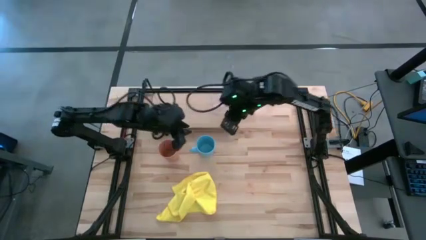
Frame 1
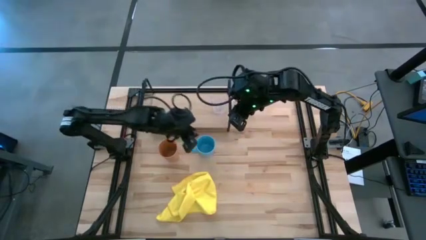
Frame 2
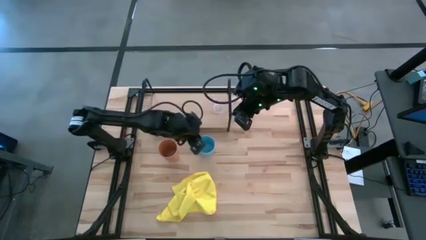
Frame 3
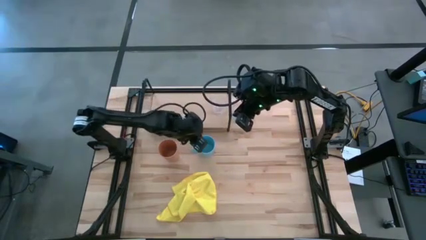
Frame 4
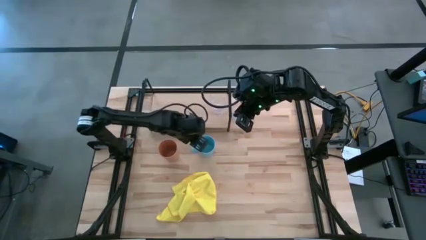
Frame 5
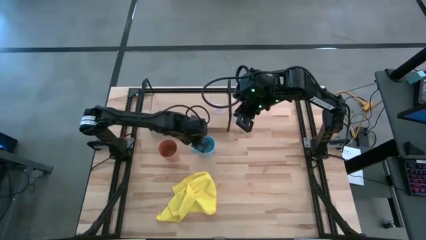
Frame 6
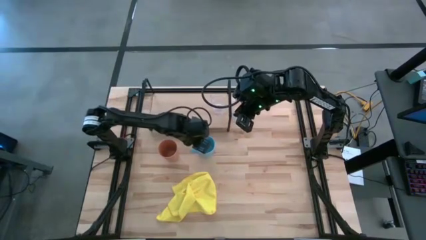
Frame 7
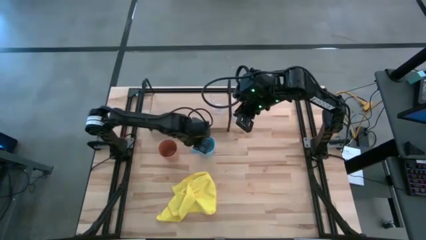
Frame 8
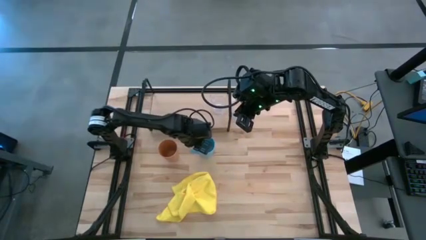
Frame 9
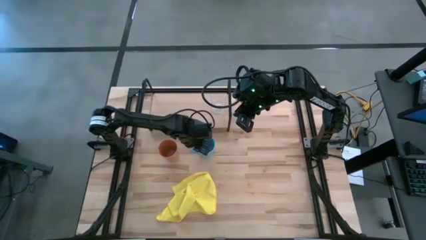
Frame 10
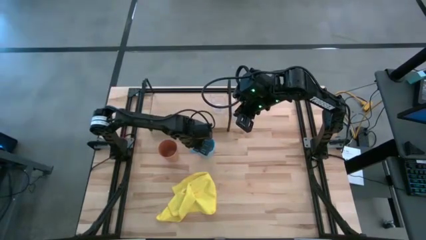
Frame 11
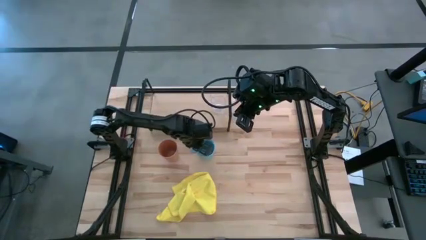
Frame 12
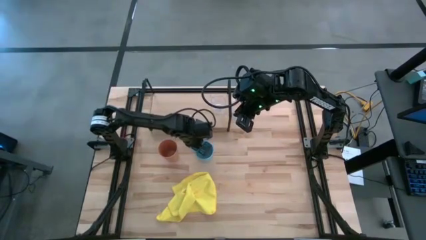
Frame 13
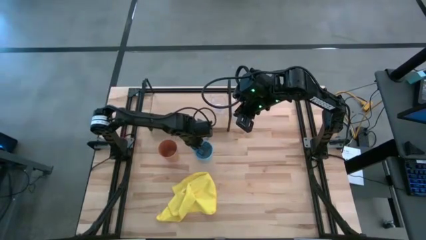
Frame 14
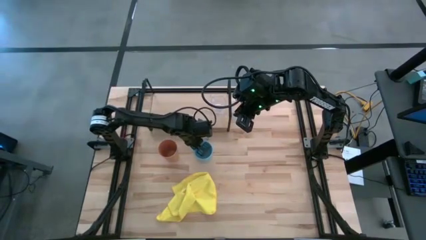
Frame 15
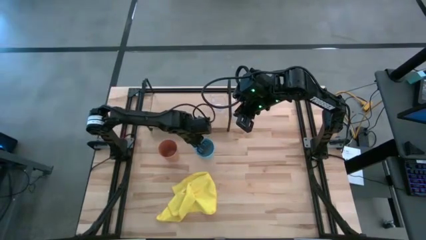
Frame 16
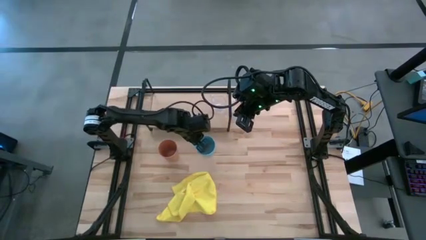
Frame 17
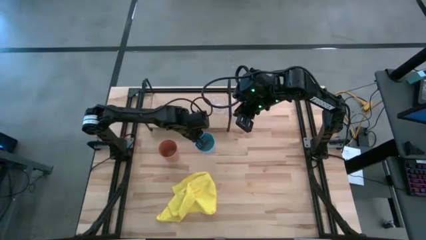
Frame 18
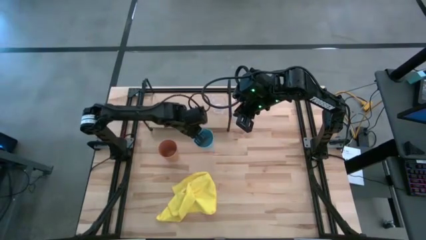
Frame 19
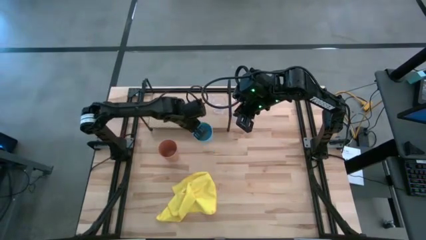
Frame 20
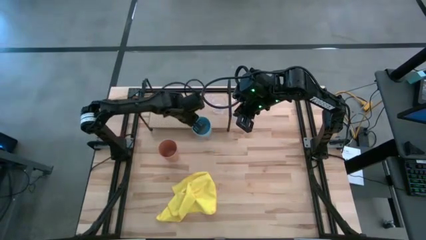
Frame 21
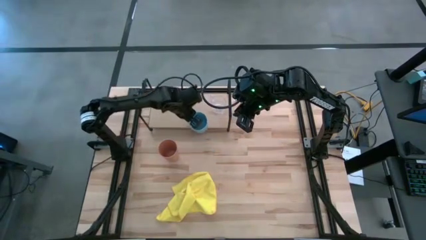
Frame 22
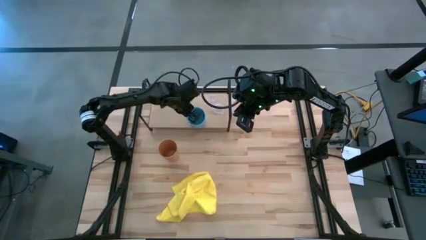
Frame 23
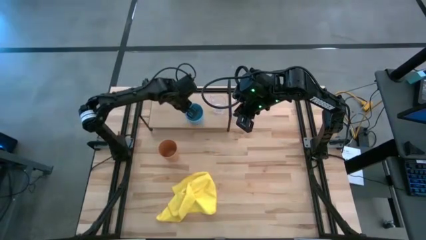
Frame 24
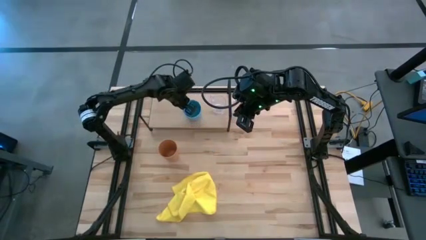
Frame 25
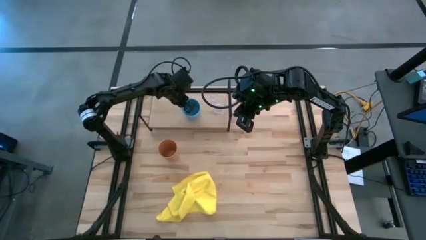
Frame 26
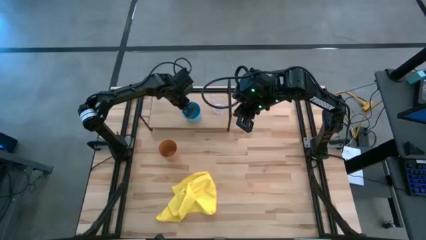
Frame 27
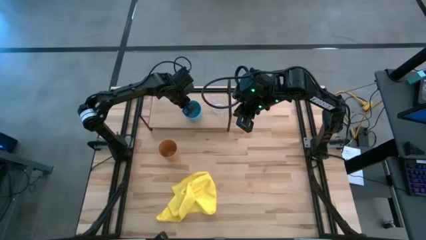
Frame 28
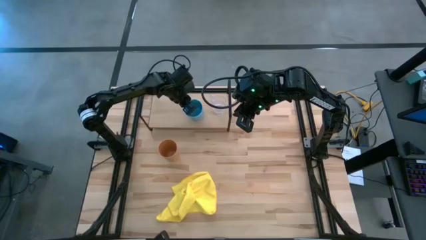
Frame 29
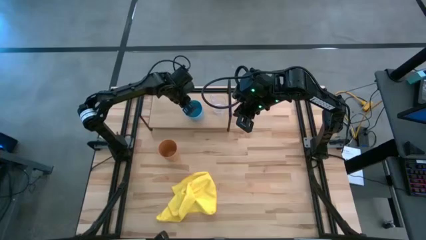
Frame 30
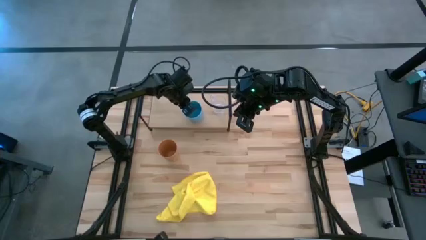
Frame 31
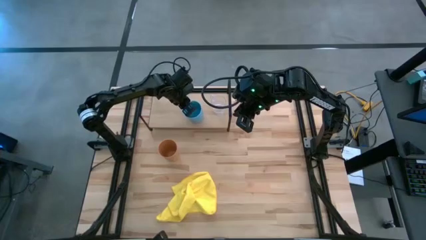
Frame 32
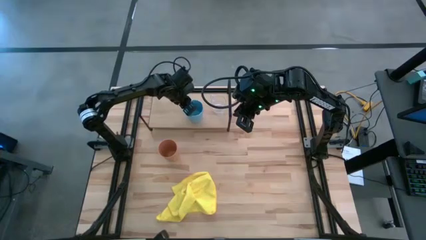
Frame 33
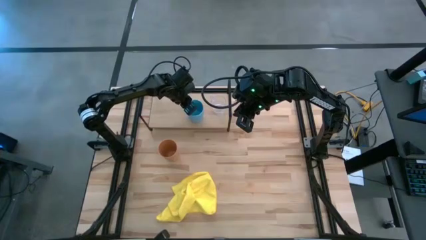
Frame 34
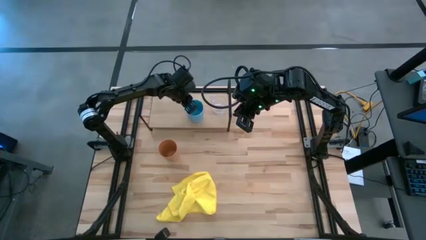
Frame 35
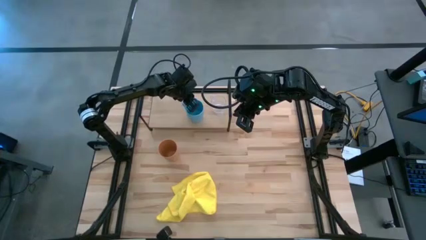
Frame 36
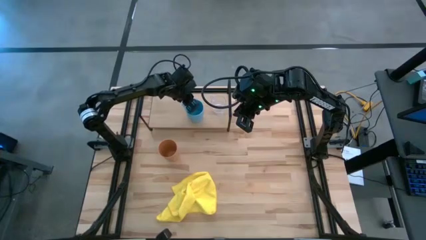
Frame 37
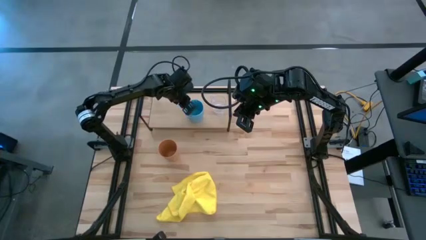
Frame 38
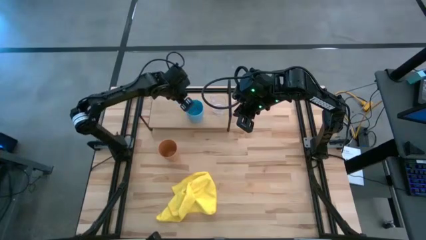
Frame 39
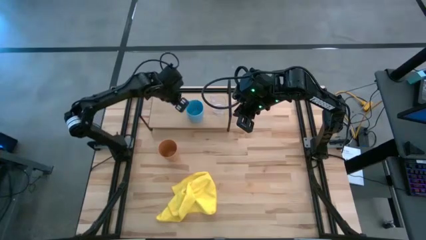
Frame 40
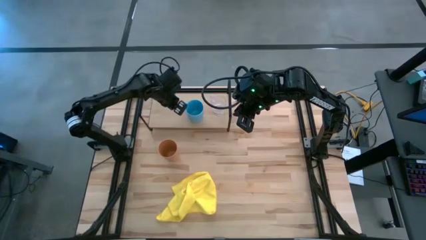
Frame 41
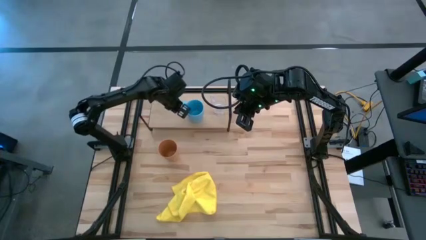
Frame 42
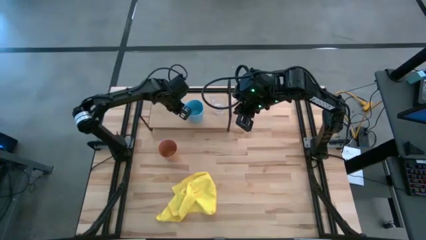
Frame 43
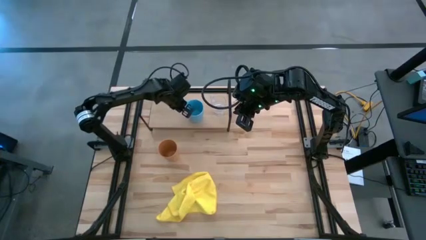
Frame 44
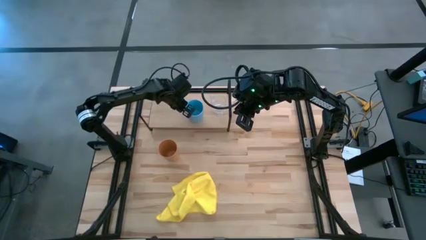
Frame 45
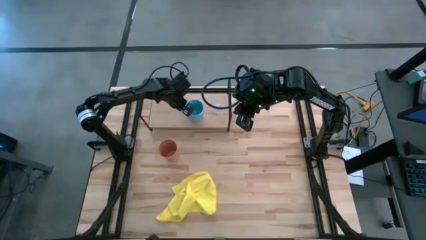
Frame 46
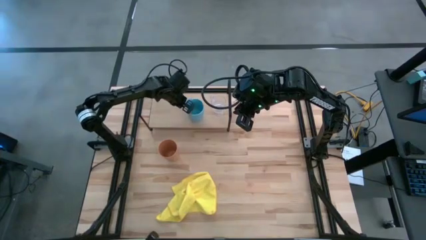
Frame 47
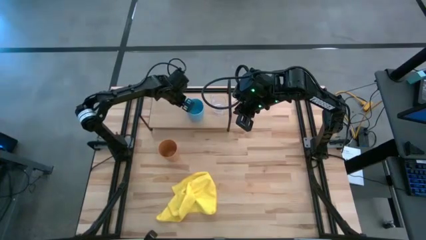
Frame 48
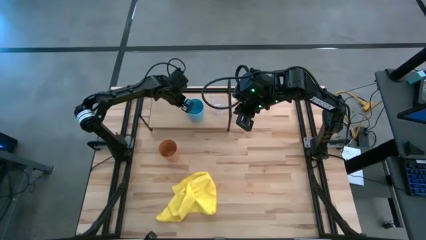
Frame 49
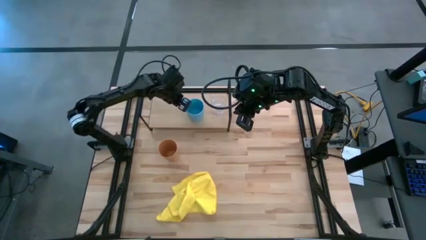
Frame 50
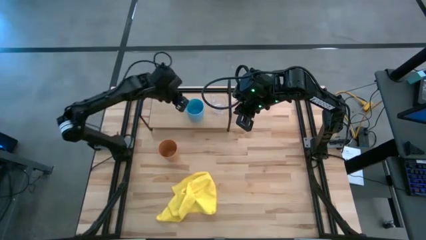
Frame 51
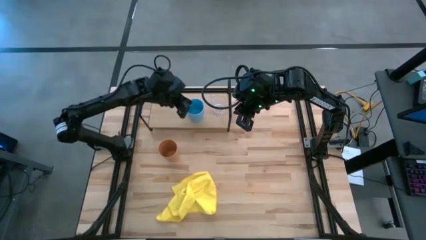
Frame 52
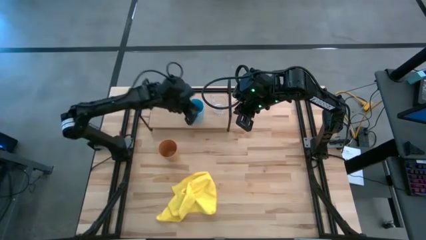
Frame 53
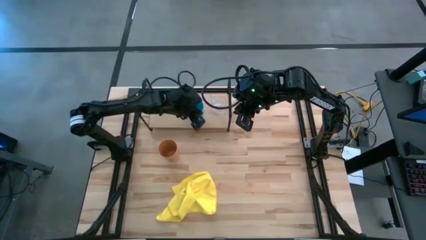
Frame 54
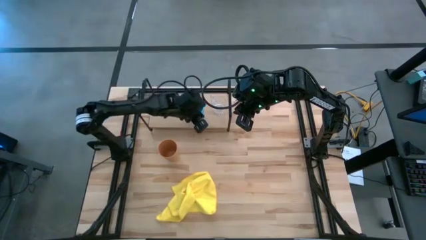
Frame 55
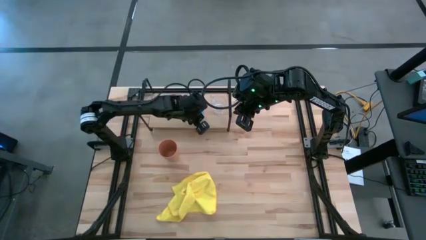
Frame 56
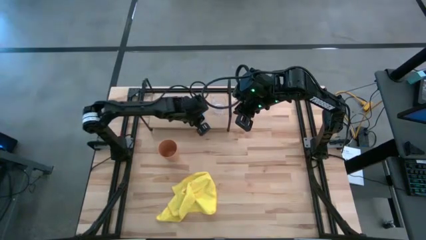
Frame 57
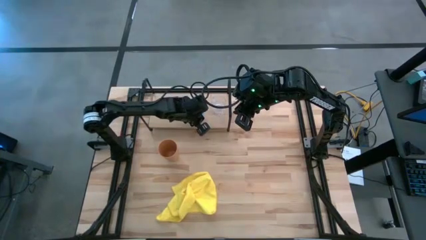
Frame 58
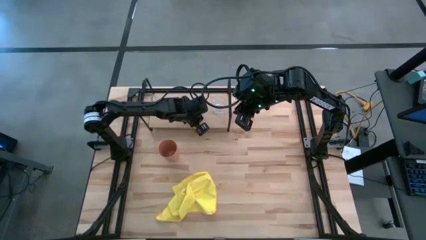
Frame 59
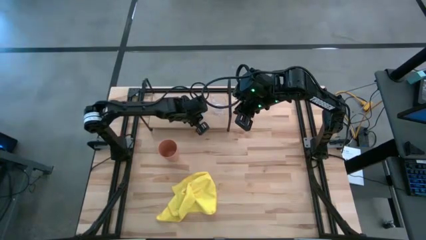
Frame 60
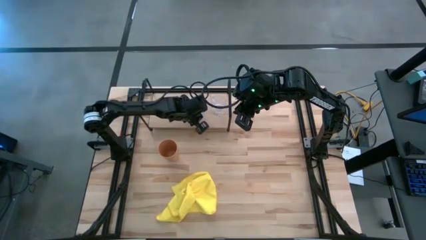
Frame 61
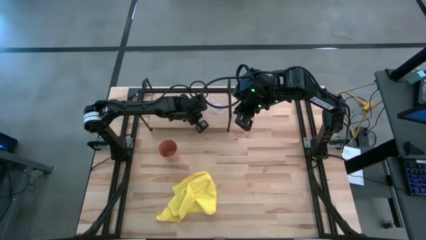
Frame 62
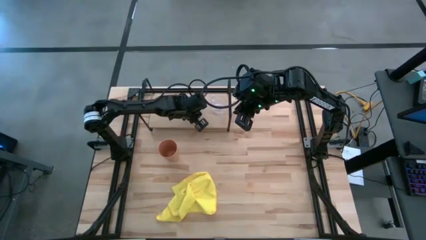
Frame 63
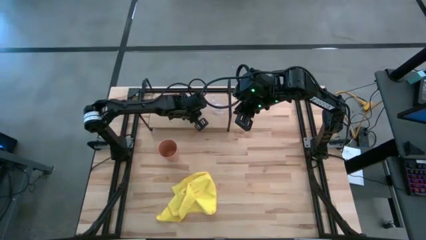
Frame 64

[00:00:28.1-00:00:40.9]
Task: Stack small to large cups/mugs on shelf
Put the blue mug on the shelf
